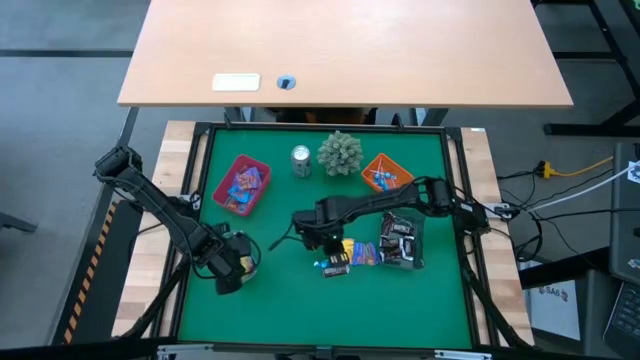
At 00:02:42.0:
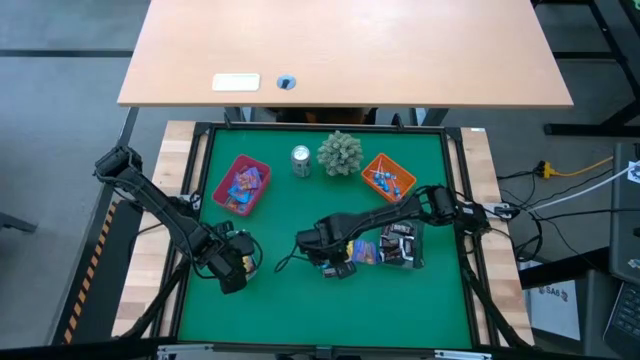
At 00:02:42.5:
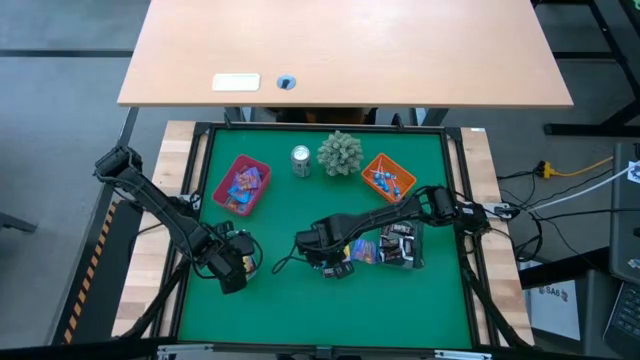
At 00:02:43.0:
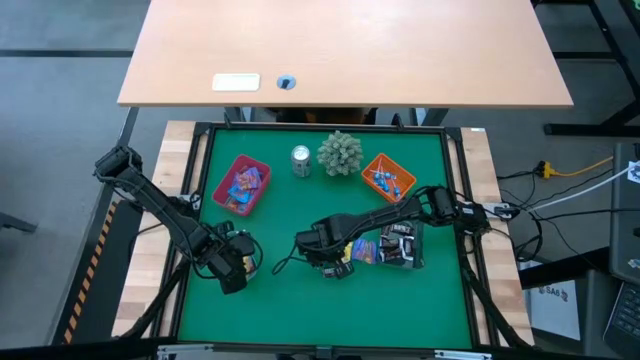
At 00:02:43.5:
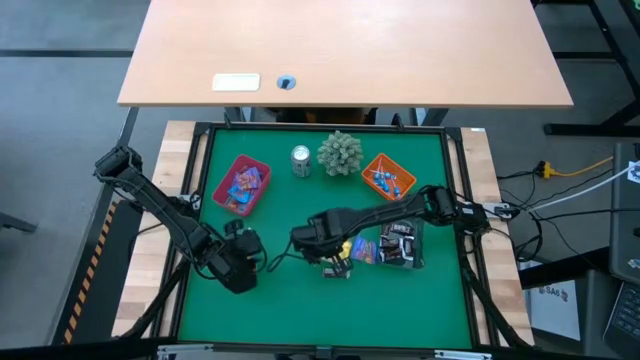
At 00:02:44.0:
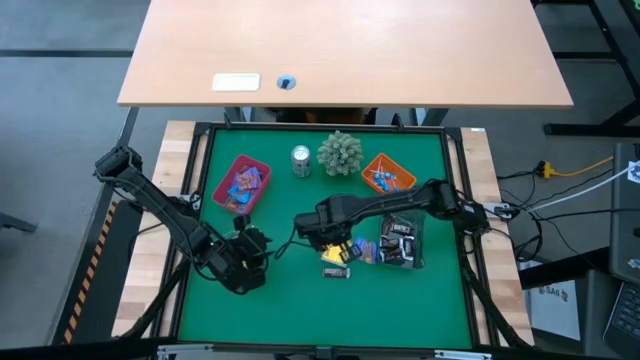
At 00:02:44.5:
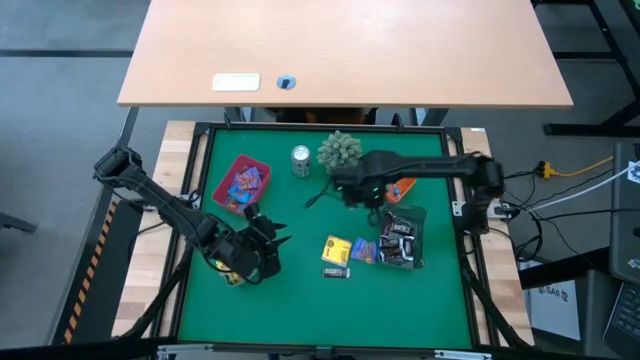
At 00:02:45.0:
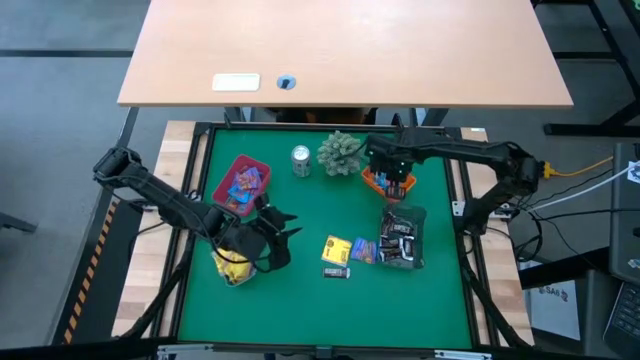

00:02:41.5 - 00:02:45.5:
Task: Sort candy
Put the blue candy into the orange bin

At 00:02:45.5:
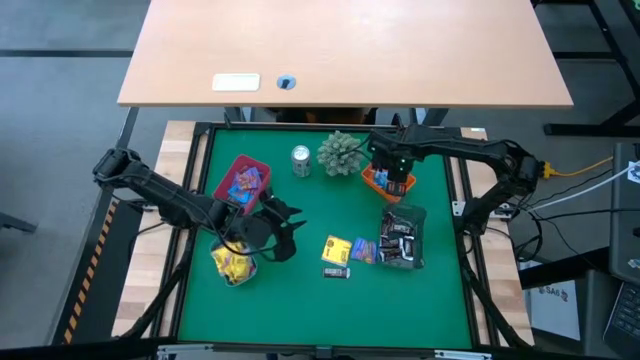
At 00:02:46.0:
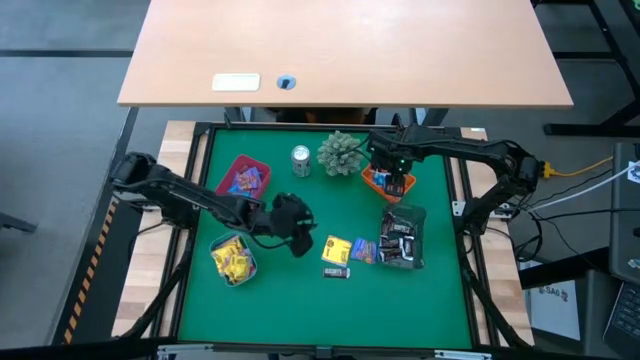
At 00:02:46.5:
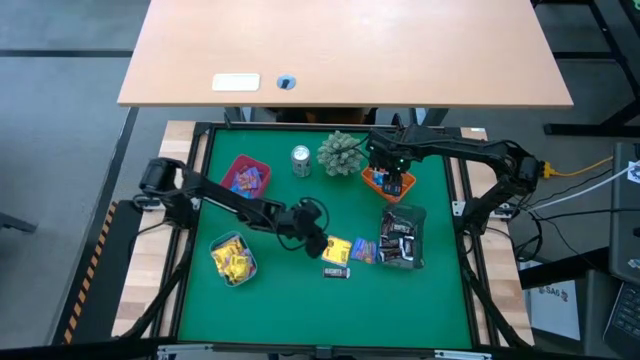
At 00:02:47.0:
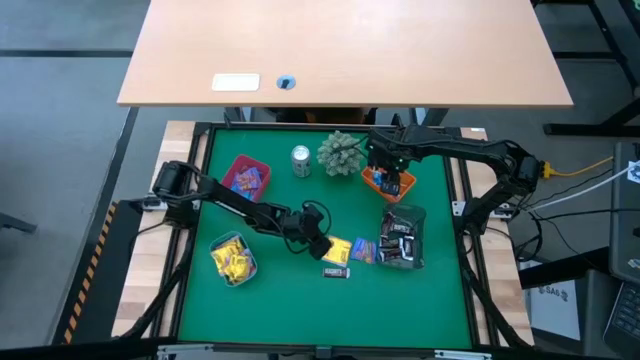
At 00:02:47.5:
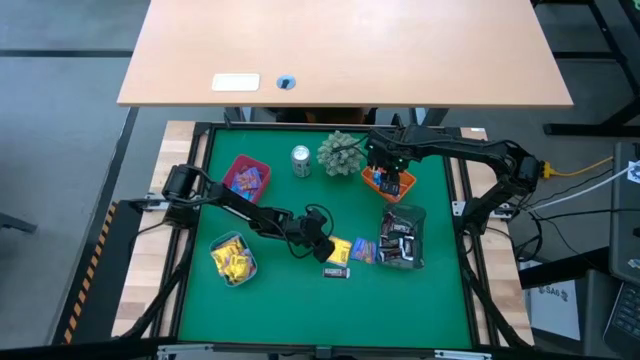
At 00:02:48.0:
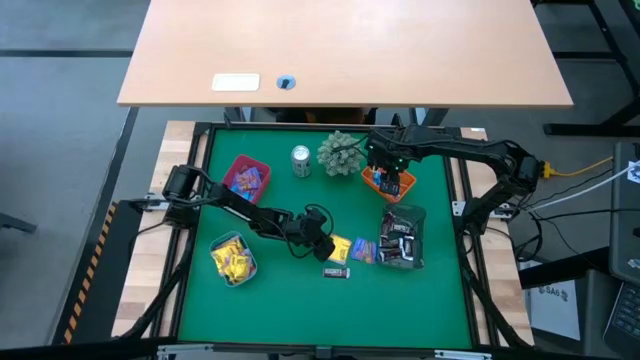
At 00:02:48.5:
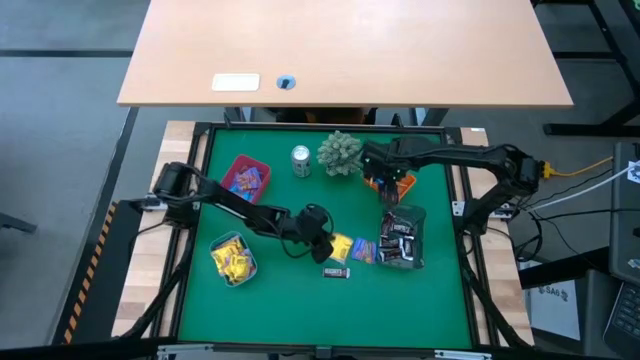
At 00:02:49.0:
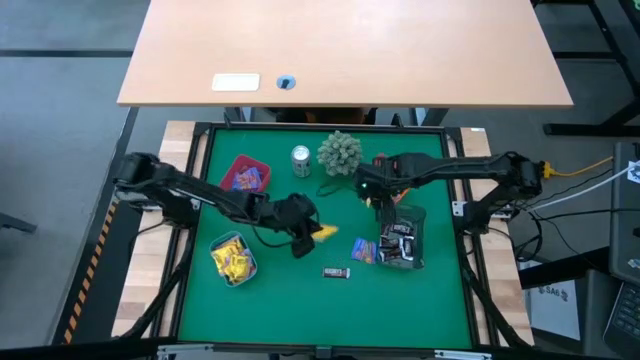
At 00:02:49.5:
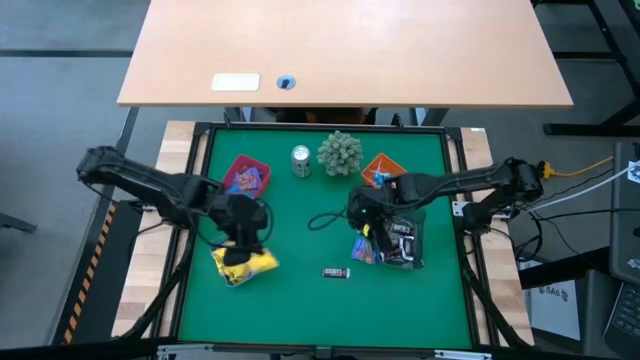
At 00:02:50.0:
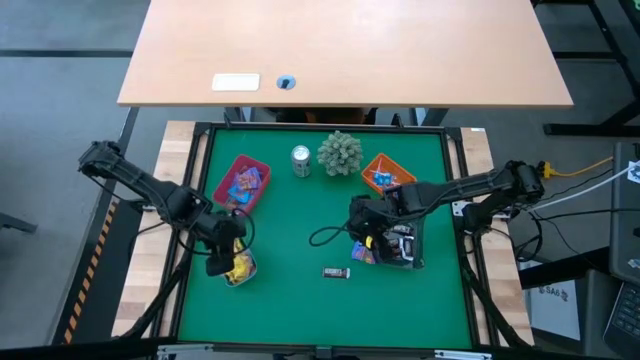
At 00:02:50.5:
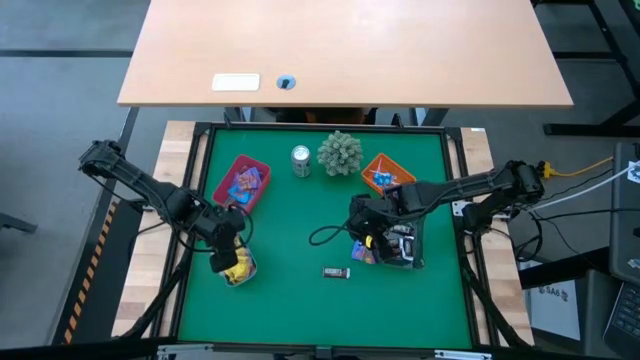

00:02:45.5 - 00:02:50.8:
Put the yellow candy into the blue transparent bin

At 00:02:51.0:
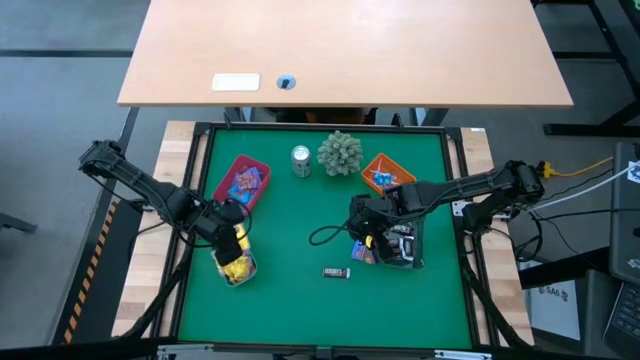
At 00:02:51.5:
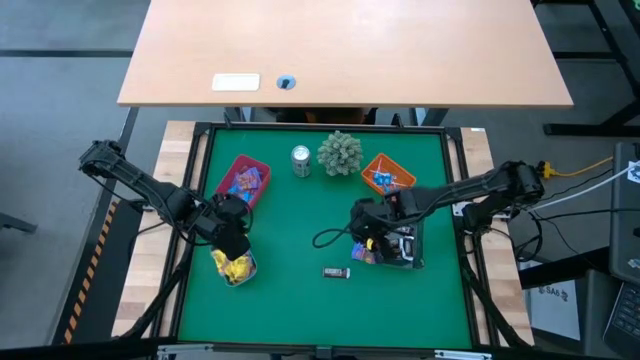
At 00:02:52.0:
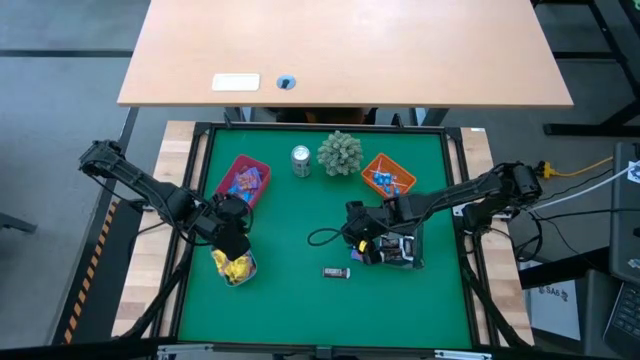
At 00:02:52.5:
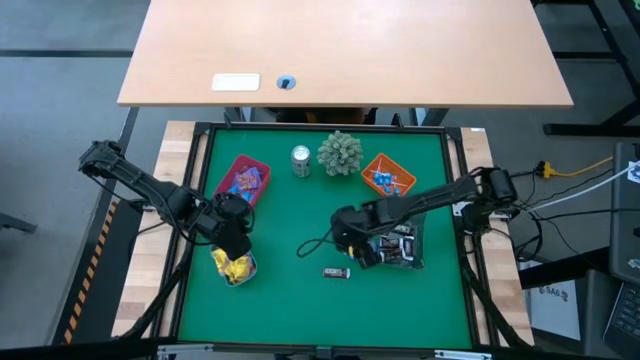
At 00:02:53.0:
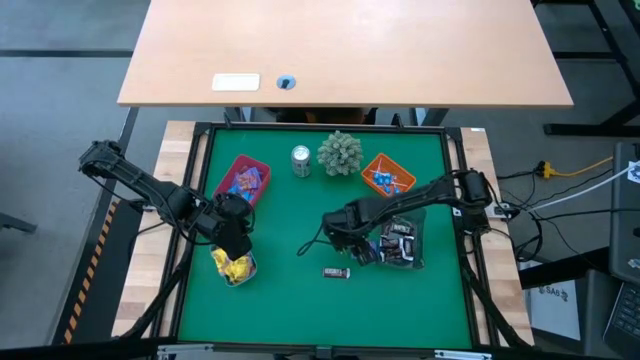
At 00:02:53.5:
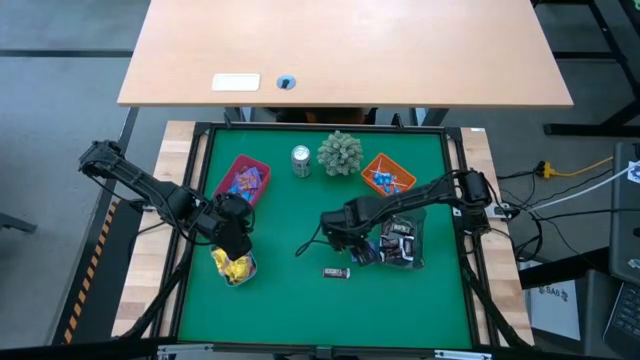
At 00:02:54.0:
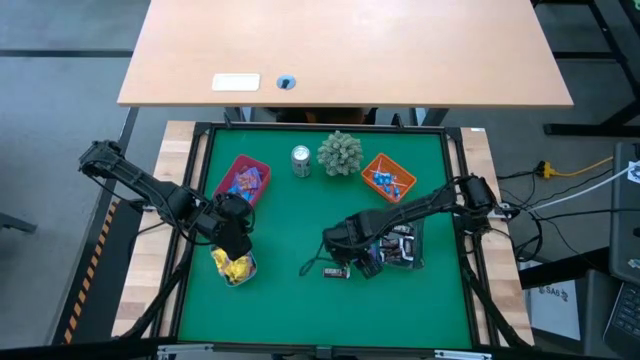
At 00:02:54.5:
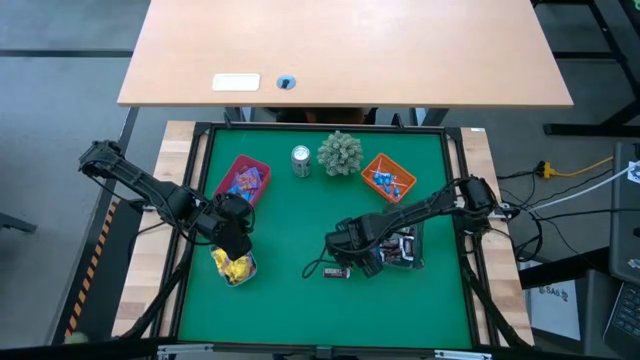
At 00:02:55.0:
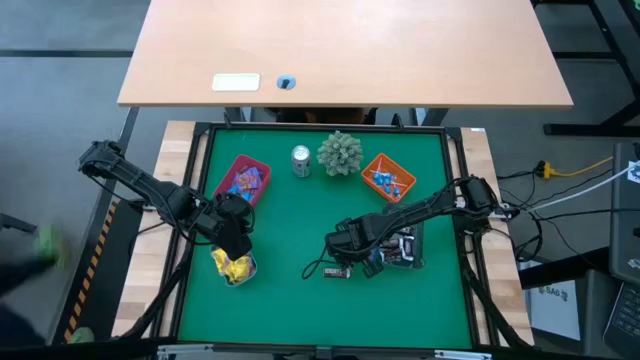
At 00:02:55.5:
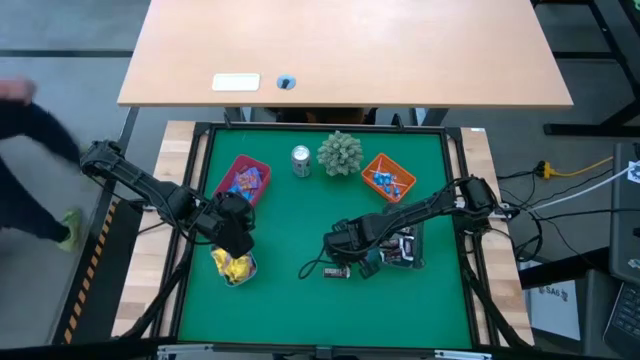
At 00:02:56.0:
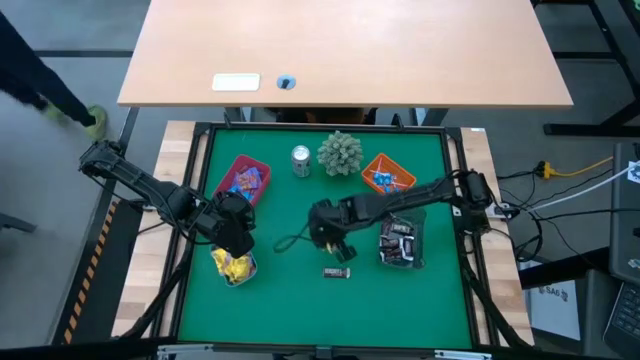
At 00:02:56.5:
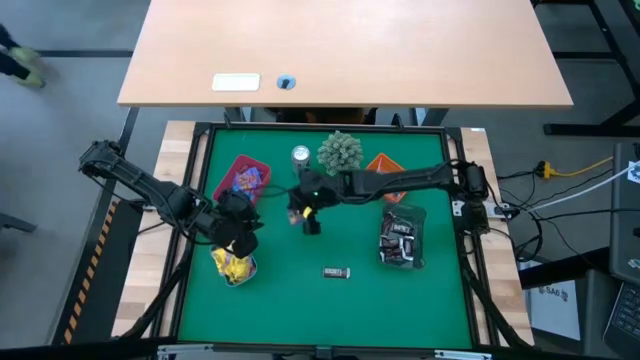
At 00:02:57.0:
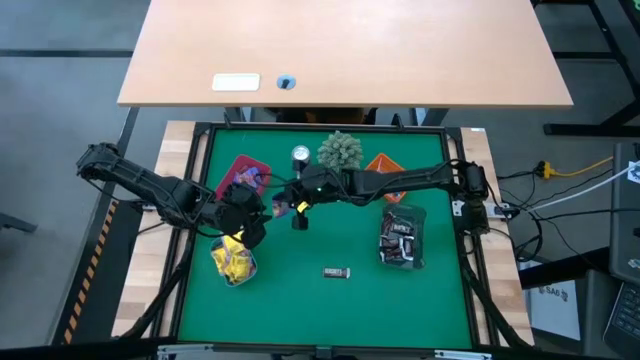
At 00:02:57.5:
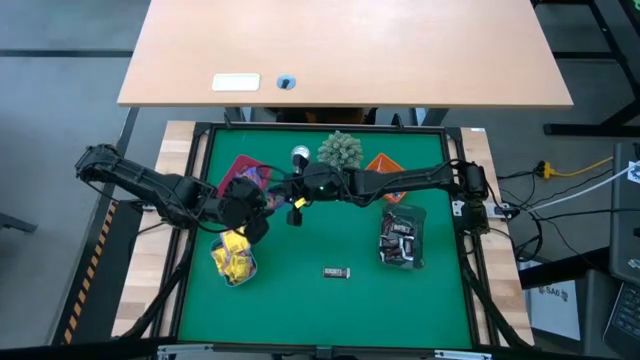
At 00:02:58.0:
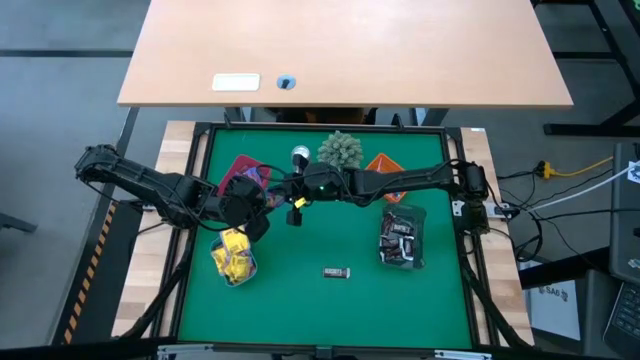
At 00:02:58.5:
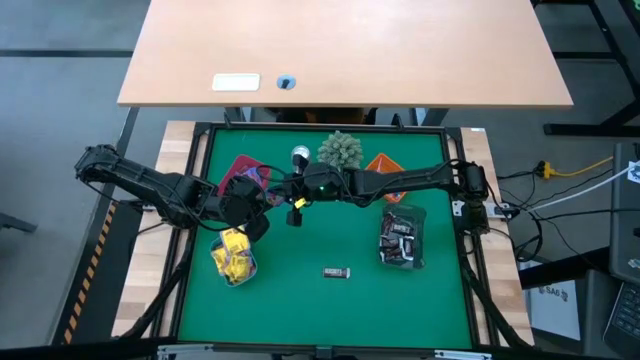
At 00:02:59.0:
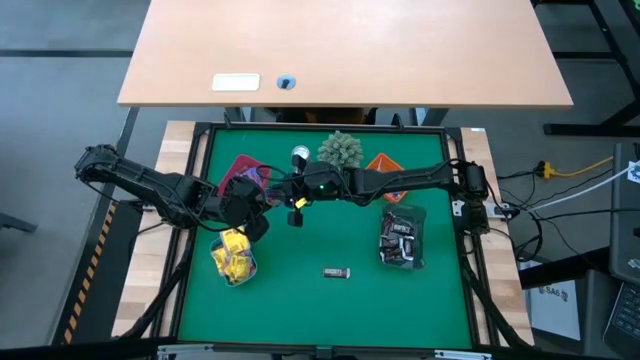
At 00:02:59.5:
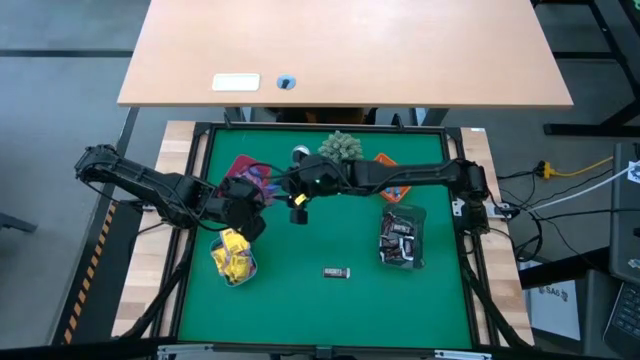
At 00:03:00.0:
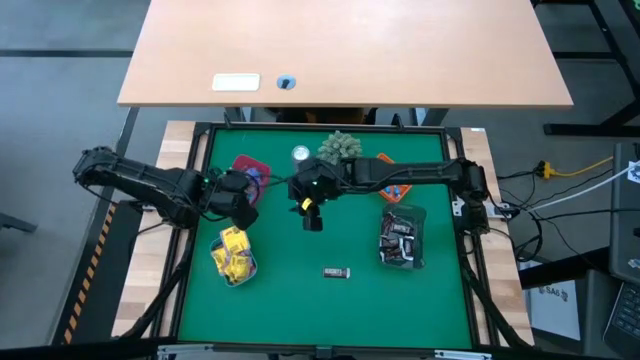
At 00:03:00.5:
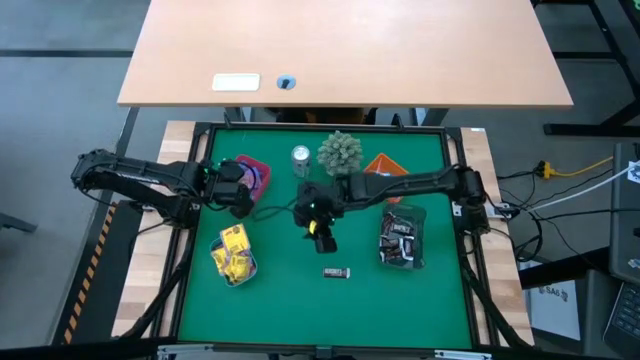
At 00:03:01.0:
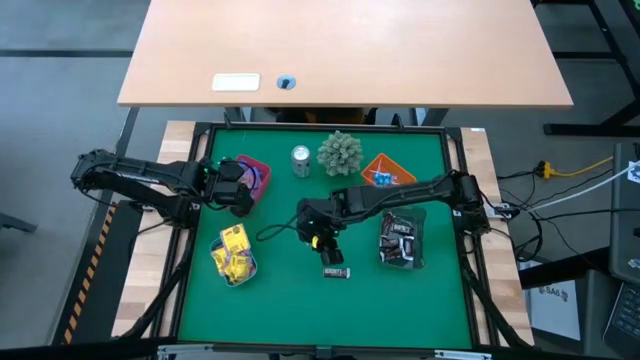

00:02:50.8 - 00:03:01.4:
Put the purple gummy into the red transparent bin

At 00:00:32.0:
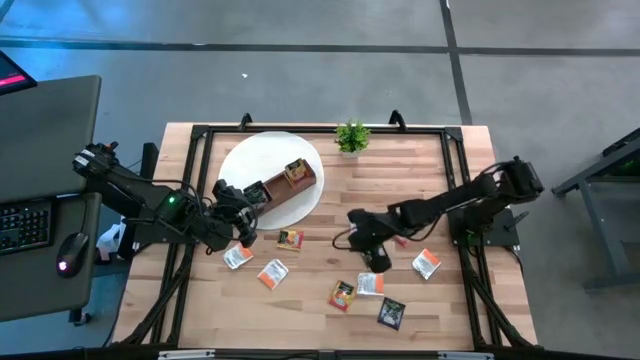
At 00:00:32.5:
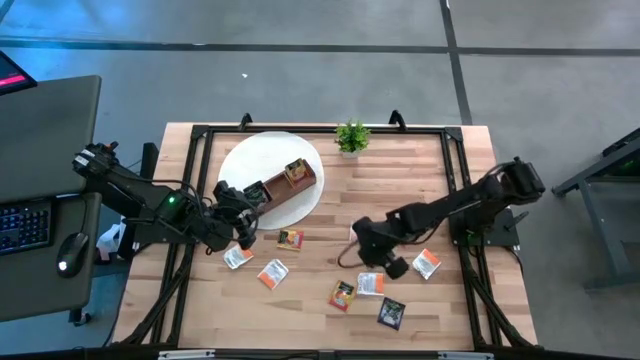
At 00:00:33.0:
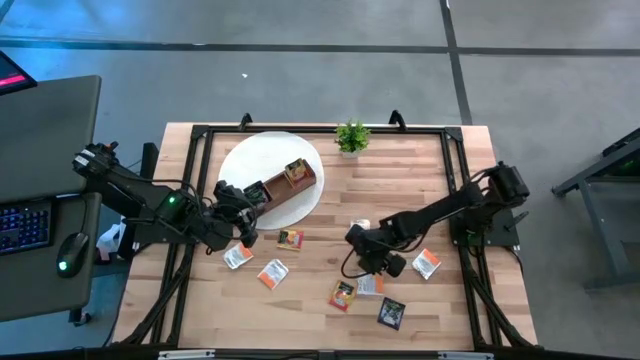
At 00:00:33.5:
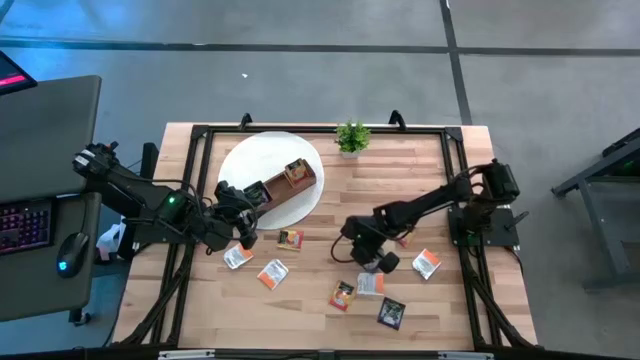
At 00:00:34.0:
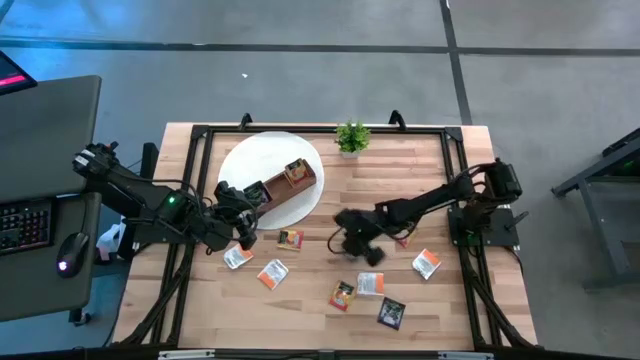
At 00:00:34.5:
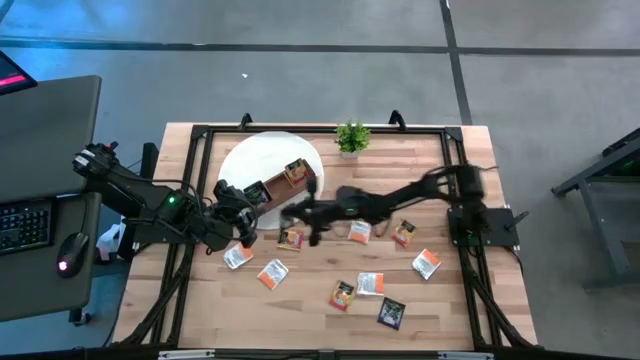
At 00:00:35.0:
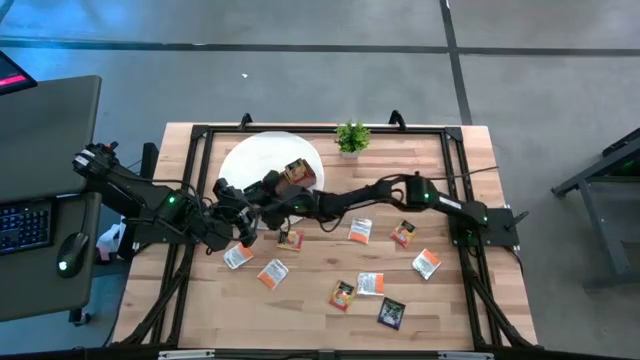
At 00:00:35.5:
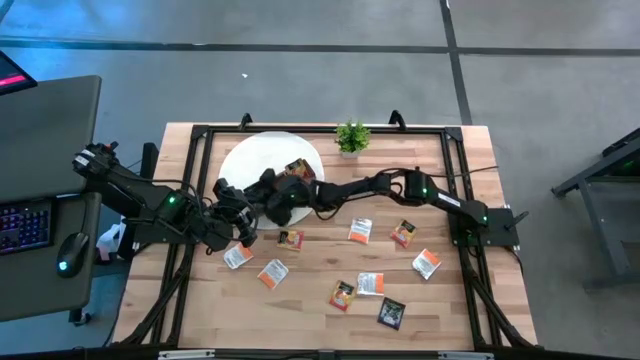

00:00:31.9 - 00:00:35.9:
Task: Pick & Place Tea
Put the purple tea bag into the left section of the wooden organizer
